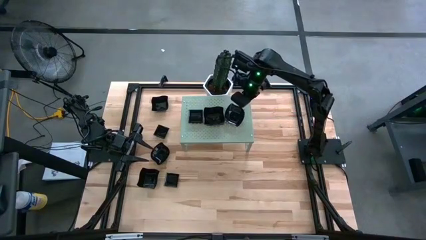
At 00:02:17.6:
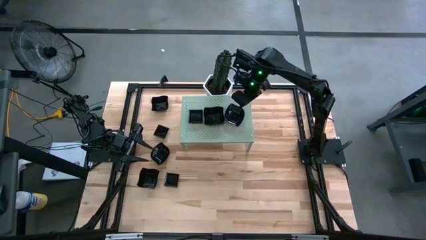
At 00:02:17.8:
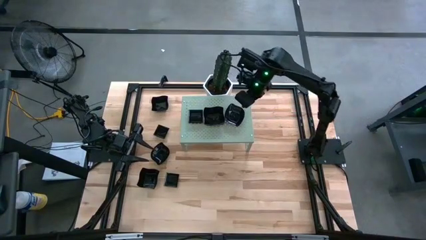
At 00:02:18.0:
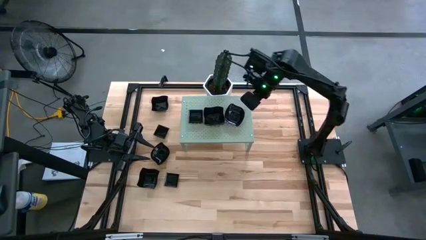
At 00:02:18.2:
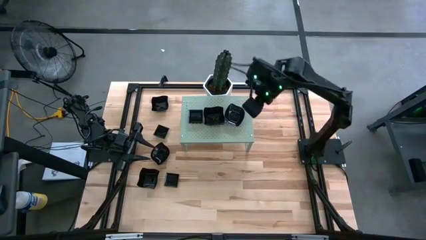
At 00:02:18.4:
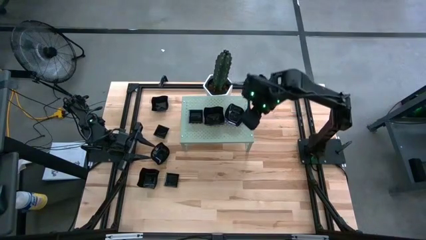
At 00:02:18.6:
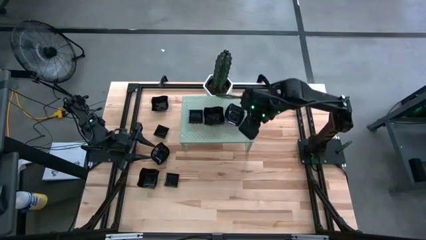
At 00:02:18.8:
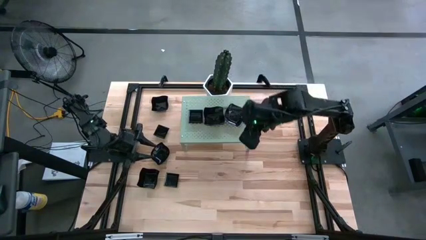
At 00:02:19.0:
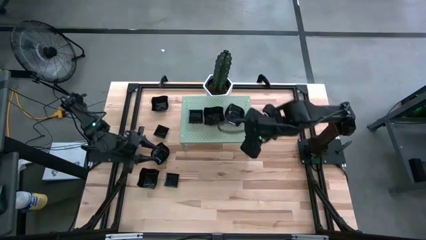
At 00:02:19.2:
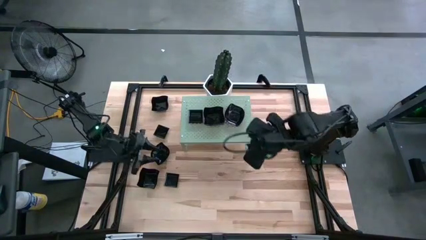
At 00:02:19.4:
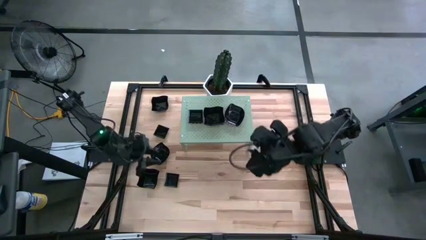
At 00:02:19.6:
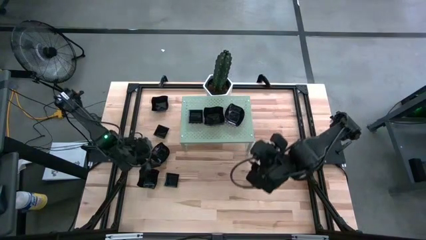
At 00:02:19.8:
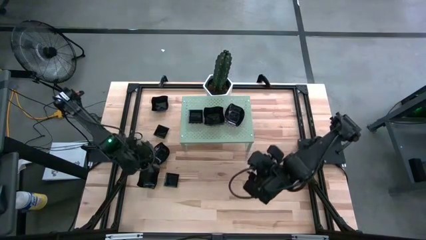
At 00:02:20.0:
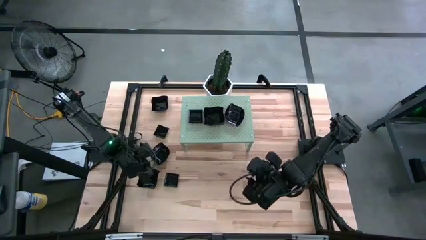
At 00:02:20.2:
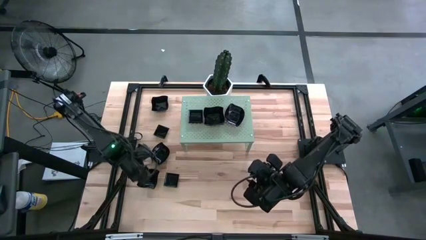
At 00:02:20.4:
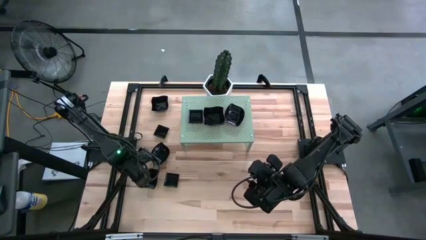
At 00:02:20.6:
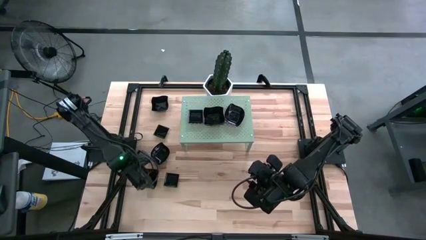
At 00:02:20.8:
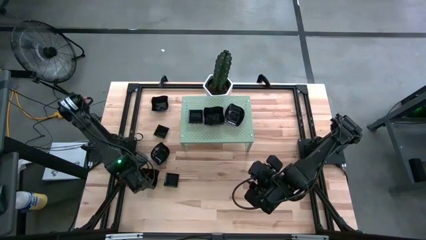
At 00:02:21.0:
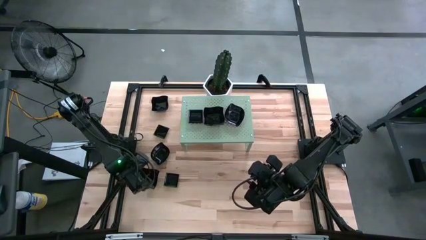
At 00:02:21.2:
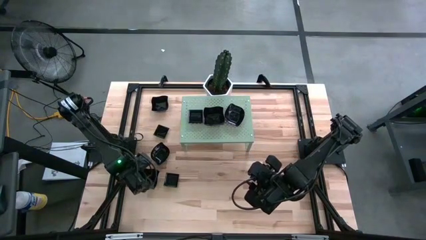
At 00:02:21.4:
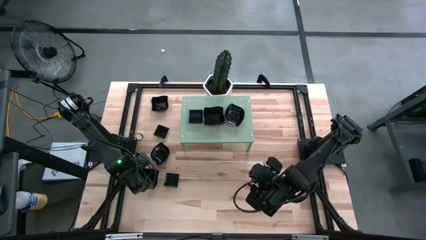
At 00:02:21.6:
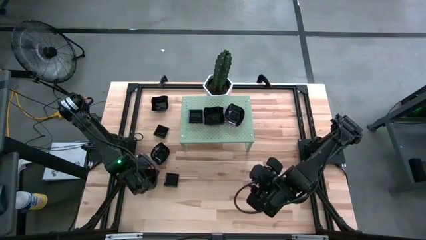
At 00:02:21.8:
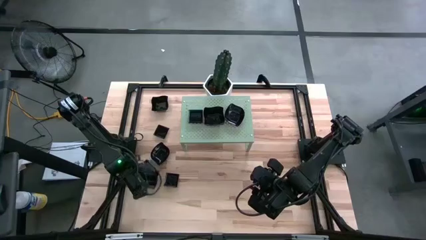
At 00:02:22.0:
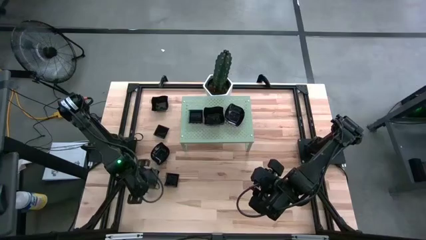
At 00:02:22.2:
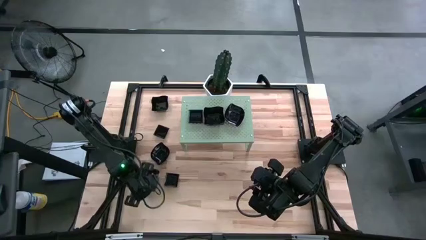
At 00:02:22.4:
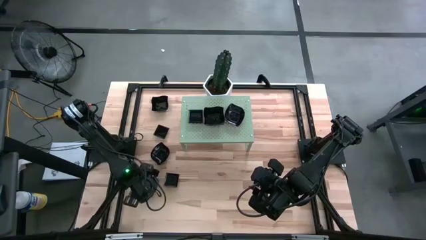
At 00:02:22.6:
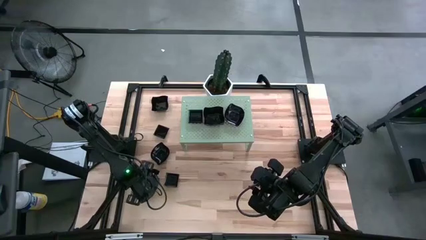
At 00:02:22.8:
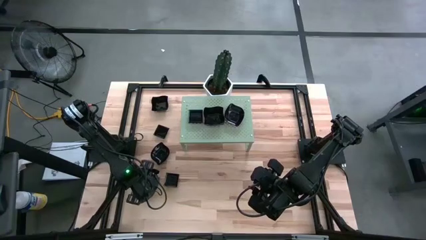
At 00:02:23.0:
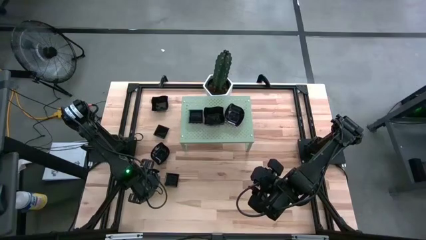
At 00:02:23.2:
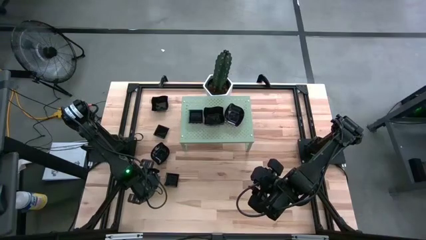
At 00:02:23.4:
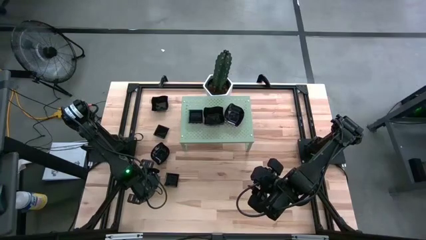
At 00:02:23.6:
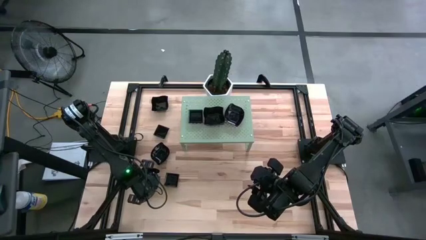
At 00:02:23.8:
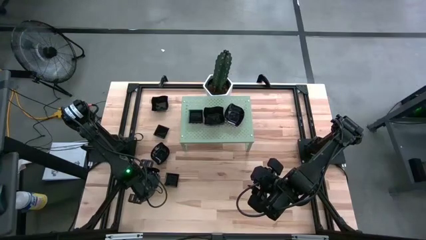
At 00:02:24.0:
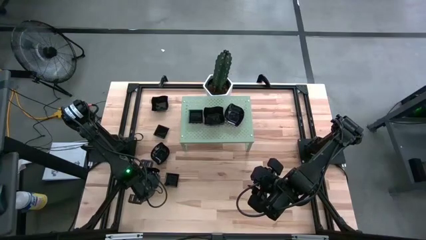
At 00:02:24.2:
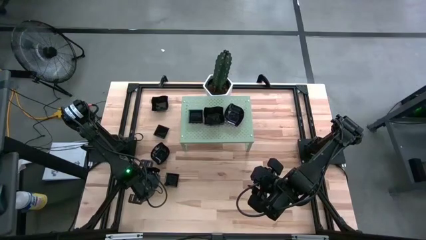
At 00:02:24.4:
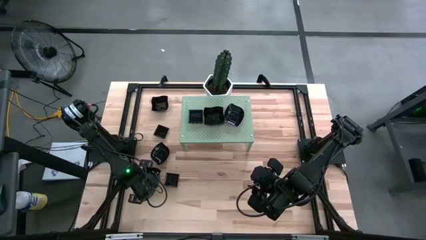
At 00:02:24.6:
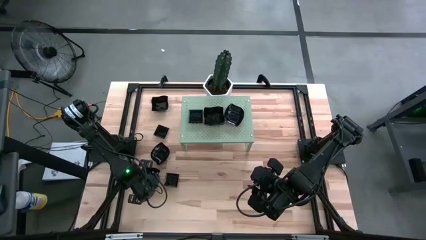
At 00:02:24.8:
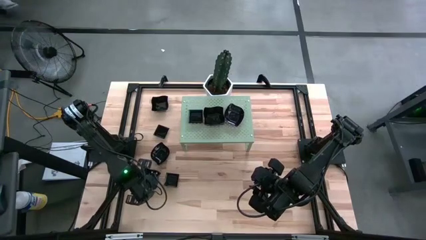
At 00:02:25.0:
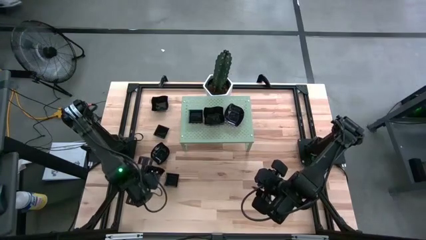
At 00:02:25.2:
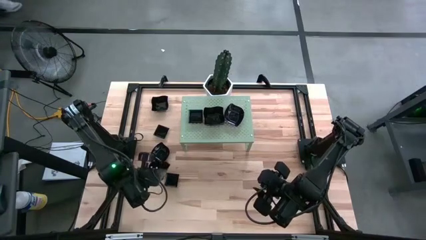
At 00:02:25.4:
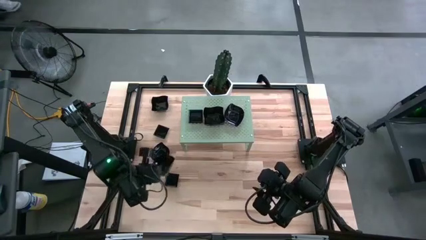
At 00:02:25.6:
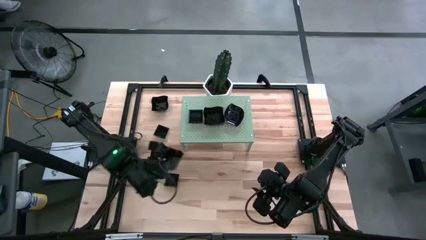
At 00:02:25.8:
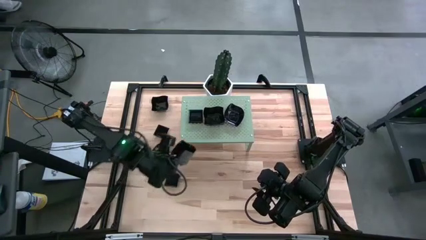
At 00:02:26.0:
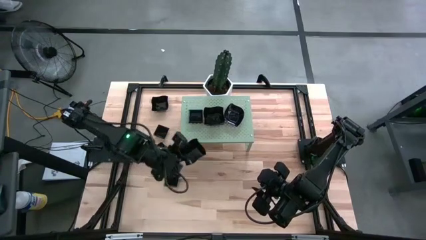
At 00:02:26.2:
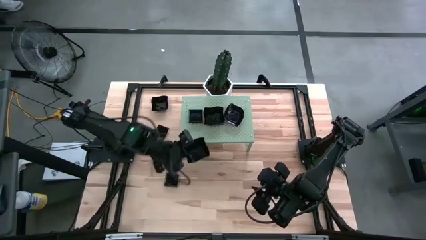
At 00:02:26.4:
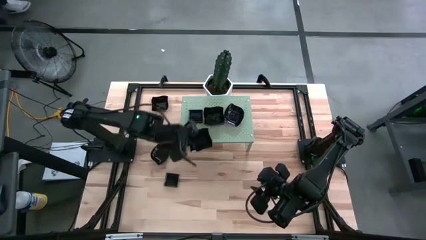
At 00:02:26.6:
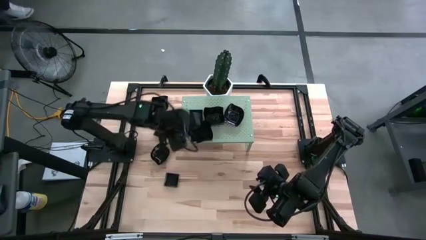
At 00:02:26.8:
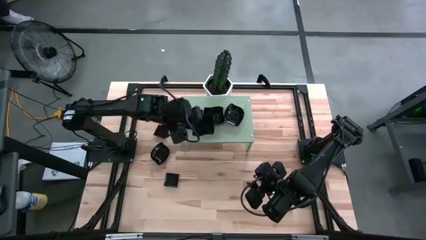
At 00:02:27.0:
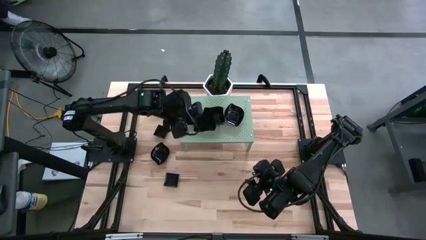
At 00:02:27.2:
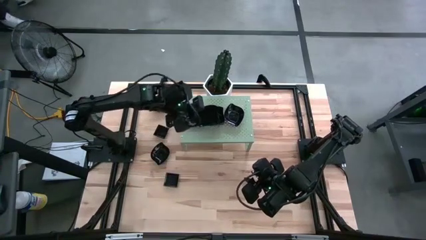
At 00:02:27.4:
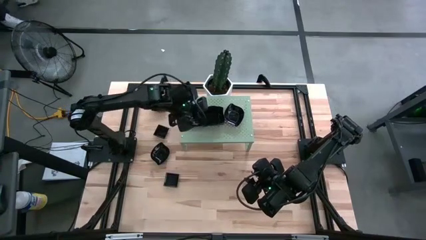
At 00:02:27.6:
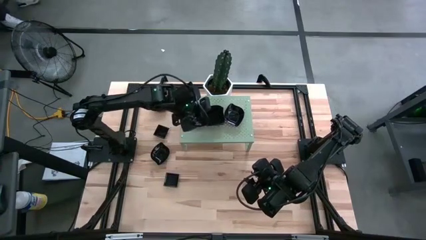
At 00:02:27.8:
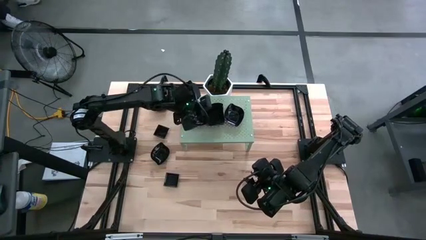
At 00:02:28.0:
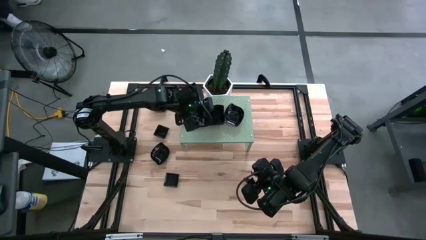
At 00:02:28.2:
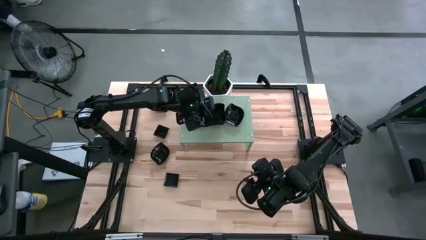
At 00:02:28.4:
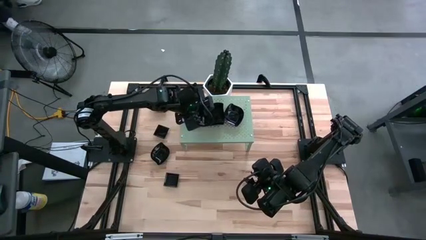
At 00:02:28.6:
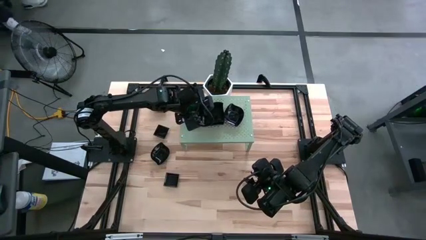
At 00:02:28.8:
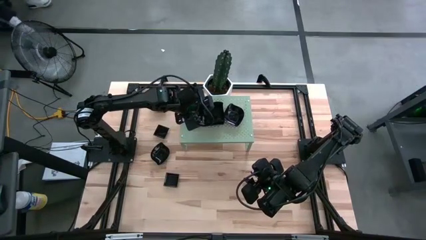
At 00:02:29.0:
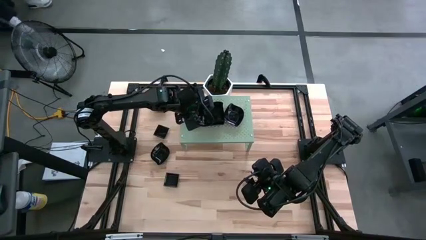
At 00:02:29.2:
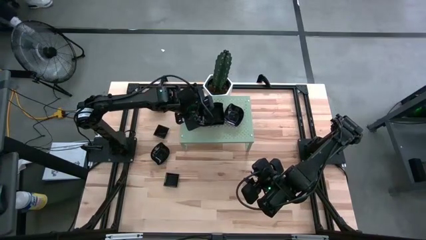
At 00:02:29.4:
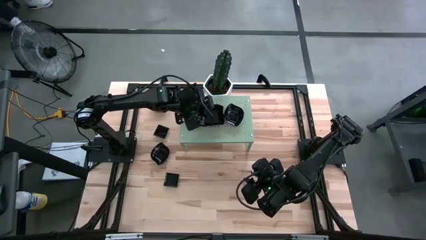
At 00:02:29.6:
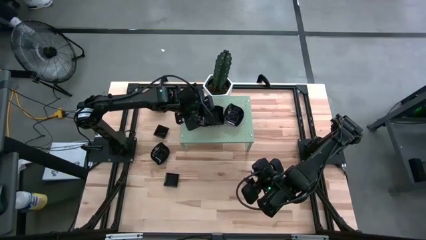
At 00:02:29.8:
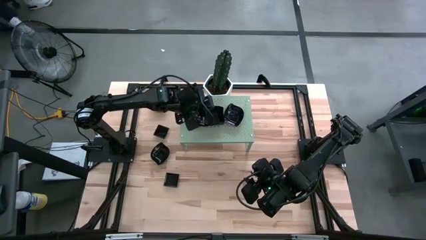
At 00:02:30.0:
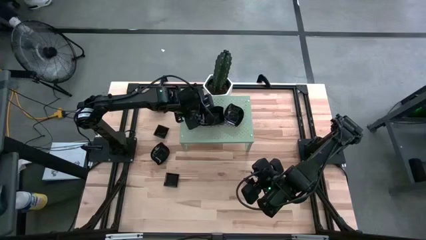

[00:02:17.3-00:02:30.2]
Task: Pick & Place Mini shaped plates
Stack the distorted square plate on top of the distorted square plates on the shelf

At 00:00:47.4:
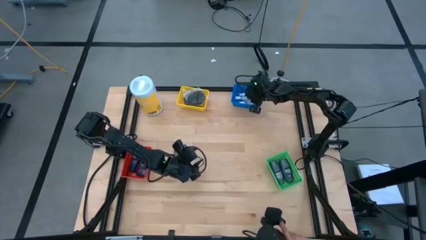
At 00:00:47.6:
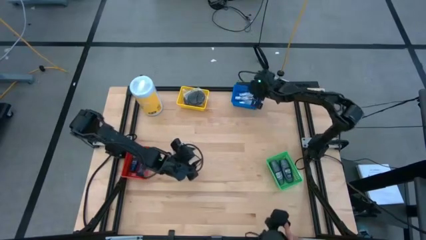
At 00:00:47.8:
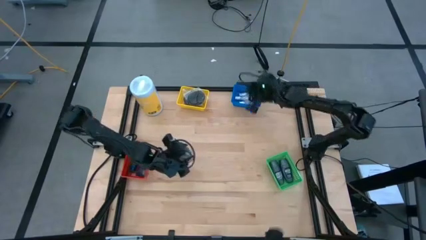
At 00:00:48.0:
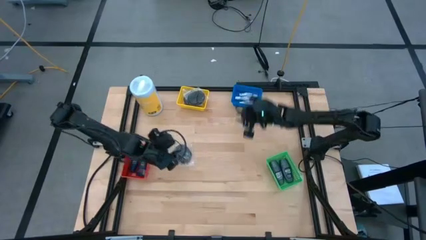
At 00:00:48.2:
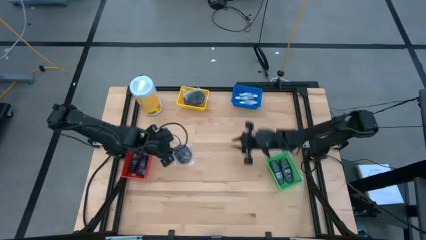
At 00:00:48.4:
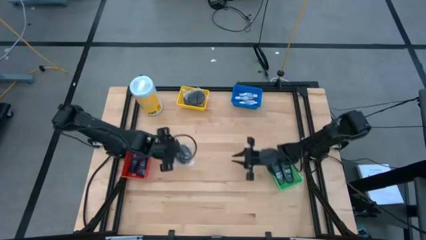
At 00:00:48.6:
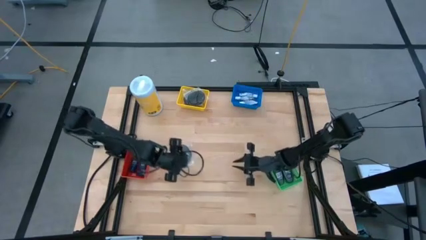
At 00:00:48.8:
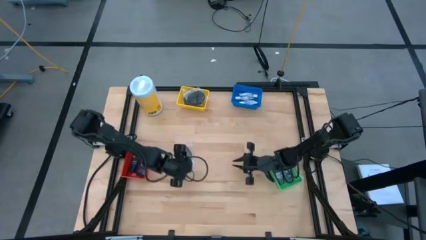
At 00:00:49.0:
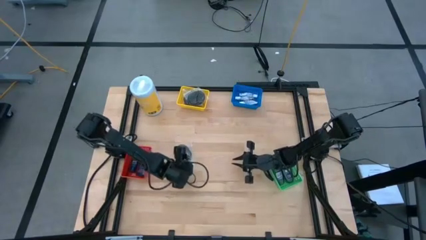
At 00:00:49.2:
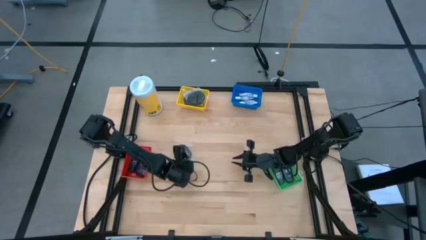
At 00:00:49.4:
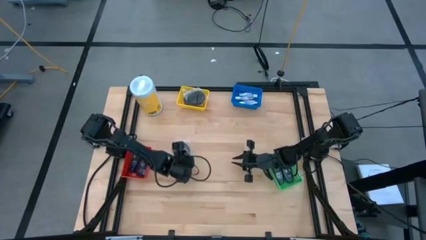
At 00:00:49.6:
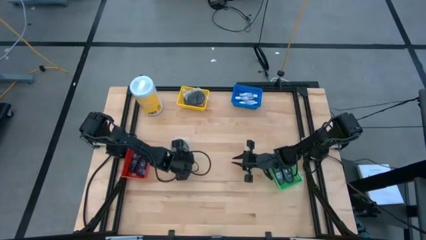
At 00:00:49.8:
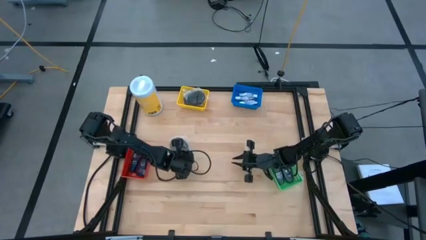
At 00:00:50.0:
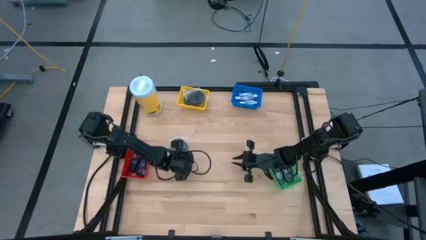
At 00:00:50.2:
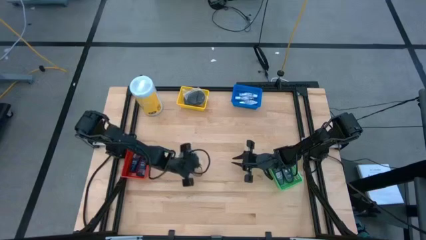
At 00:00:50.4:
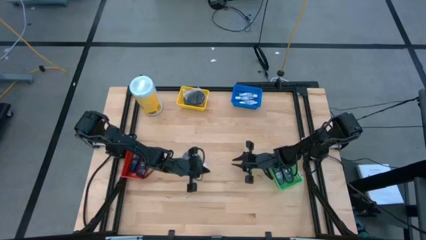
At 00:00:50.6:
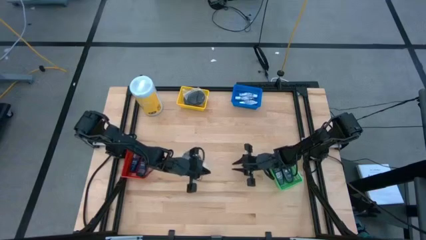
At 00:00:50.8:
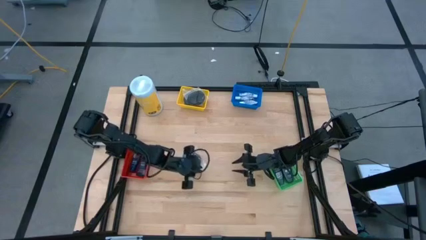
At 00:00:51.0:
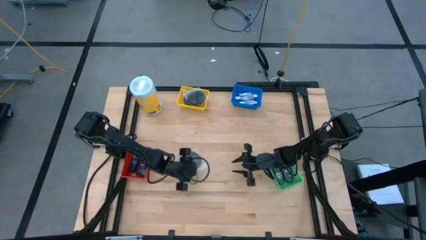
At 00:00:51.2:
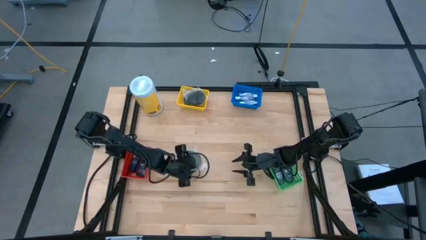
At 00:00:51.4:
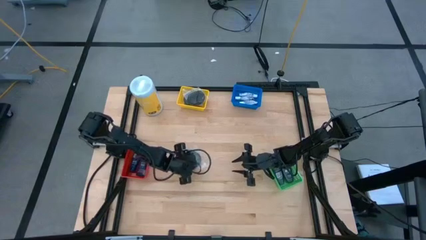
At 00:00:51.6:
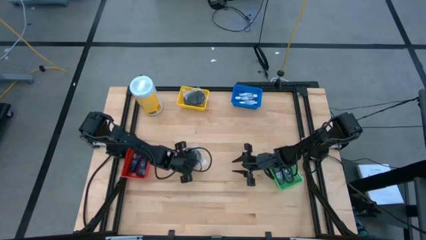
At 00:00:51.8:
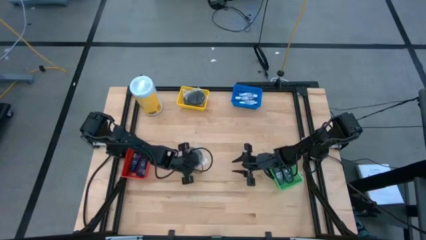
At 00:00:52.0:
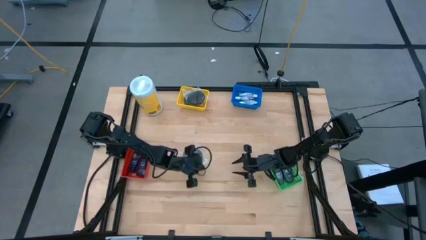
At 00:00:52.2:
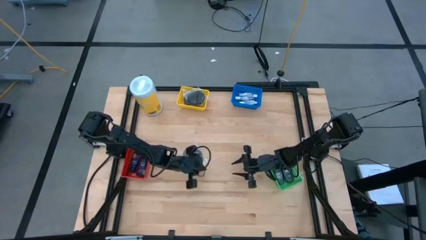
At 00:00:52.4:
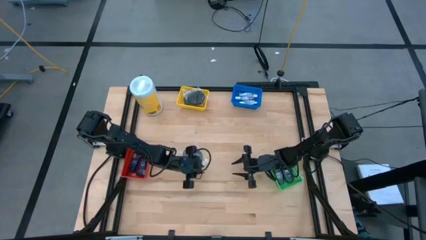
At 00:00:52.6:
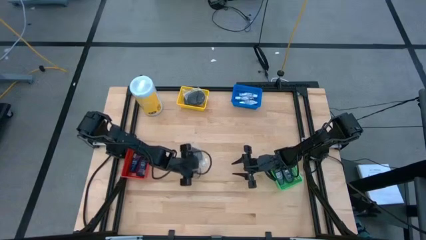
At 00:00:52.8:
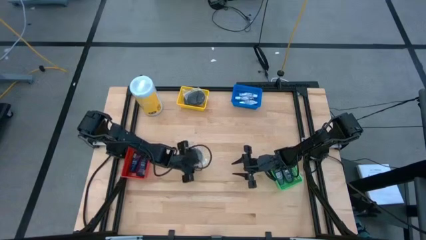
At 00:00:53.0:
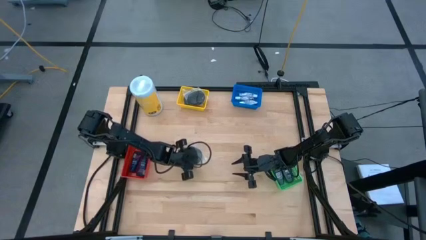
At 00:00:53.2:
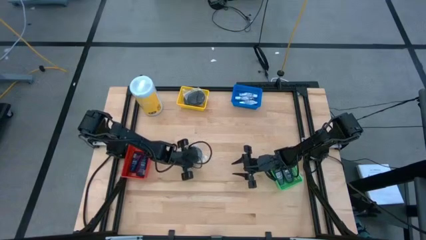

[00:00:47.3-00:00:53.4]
Task: Pick & Place Travel size toiletries
Put the black hairbrush into the yellow bin
